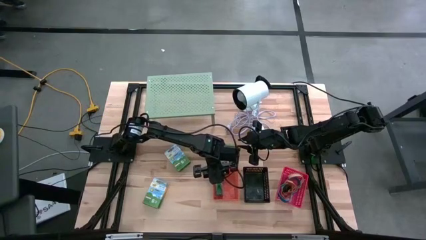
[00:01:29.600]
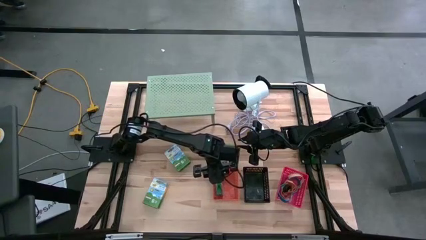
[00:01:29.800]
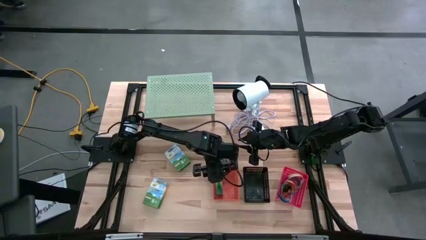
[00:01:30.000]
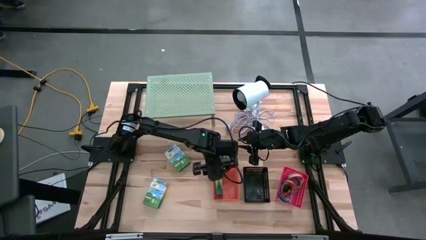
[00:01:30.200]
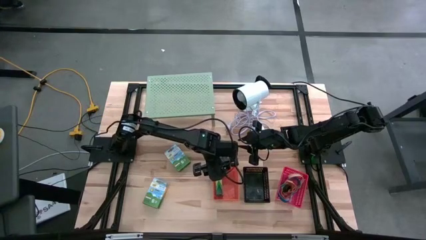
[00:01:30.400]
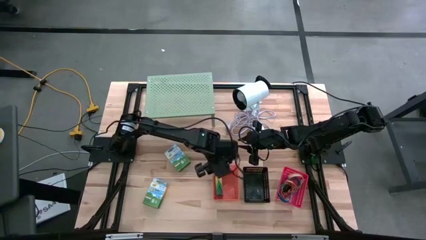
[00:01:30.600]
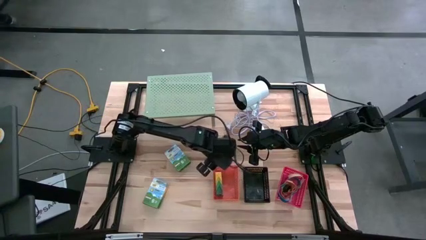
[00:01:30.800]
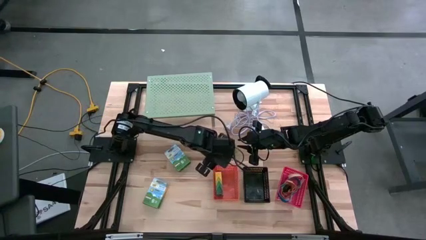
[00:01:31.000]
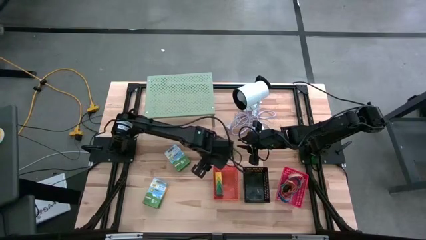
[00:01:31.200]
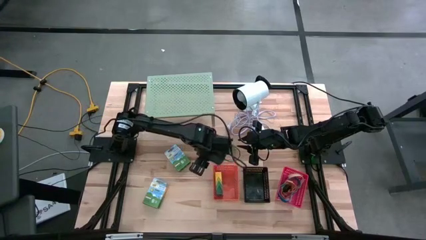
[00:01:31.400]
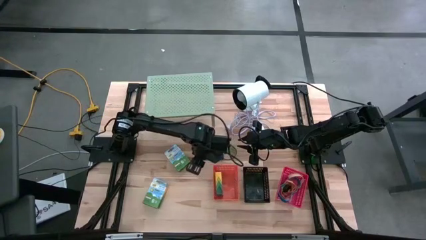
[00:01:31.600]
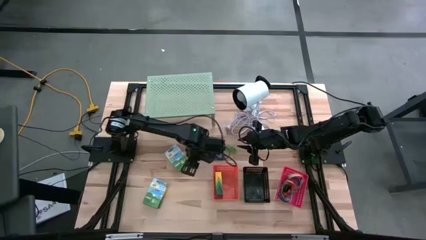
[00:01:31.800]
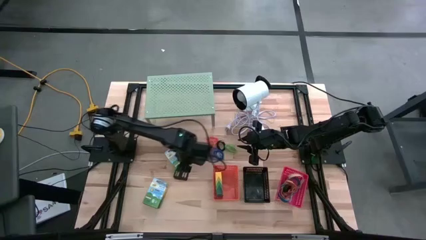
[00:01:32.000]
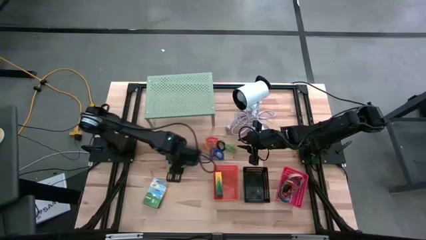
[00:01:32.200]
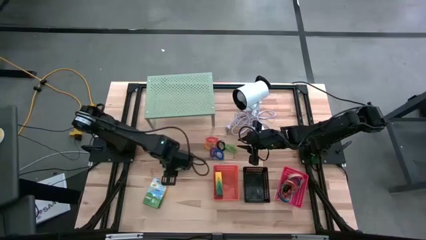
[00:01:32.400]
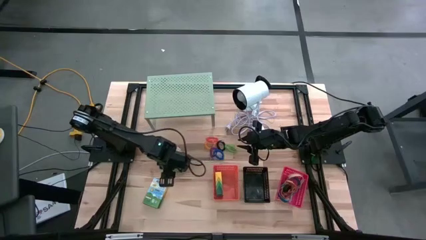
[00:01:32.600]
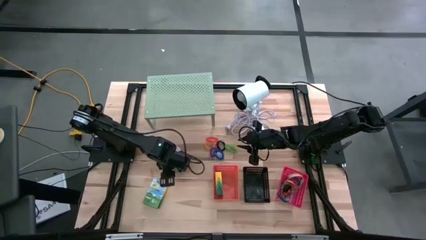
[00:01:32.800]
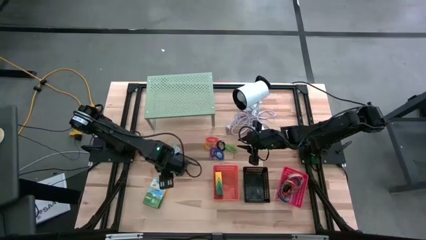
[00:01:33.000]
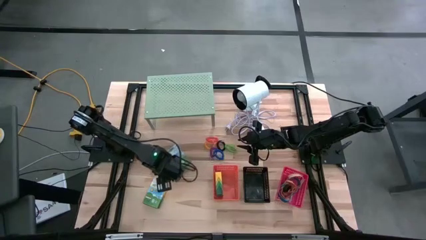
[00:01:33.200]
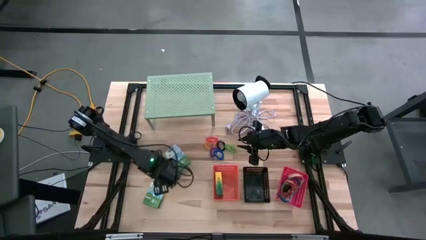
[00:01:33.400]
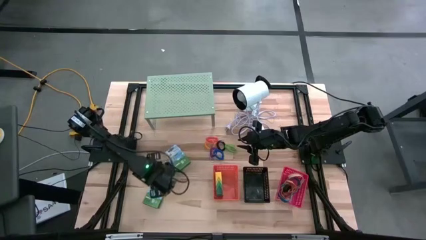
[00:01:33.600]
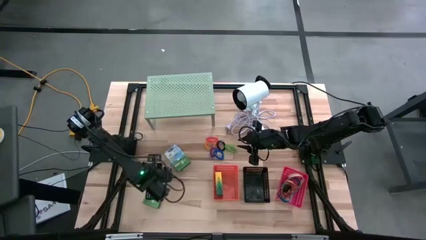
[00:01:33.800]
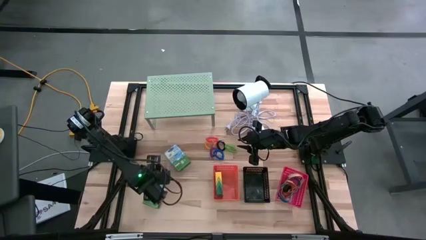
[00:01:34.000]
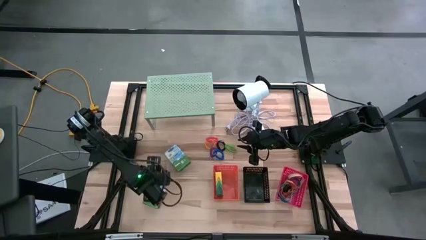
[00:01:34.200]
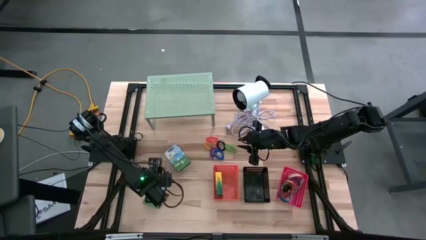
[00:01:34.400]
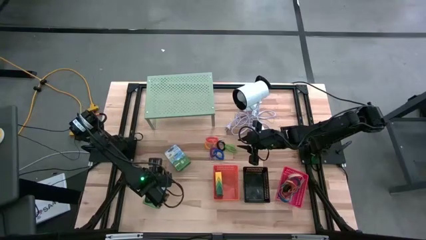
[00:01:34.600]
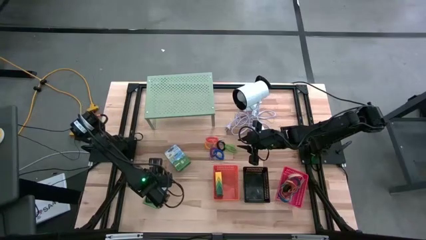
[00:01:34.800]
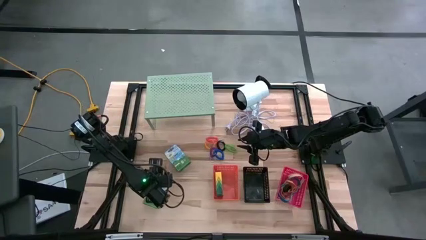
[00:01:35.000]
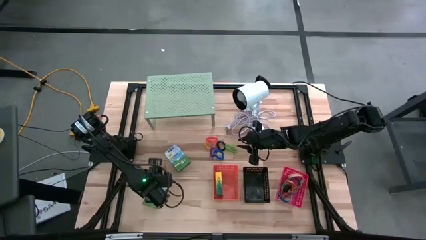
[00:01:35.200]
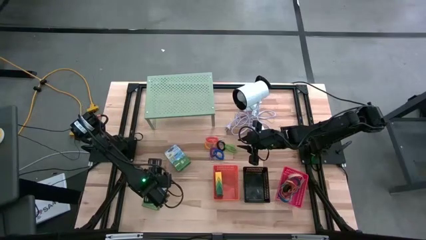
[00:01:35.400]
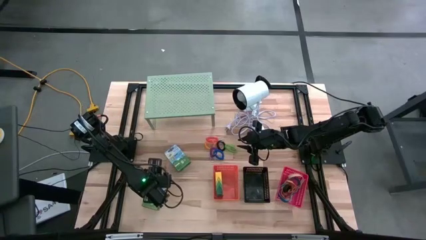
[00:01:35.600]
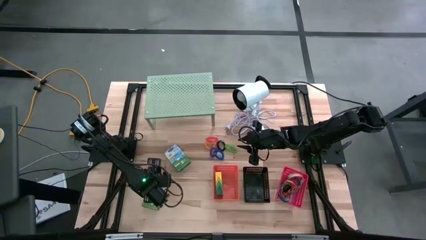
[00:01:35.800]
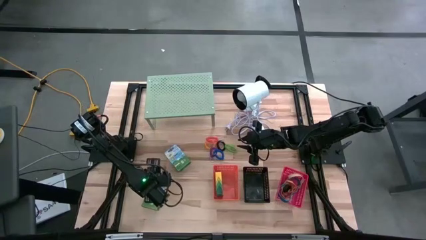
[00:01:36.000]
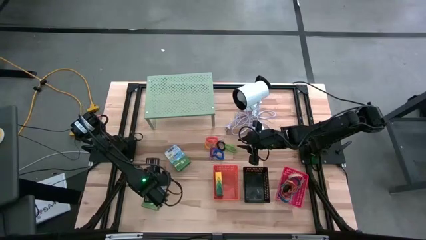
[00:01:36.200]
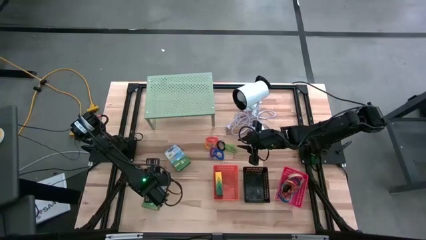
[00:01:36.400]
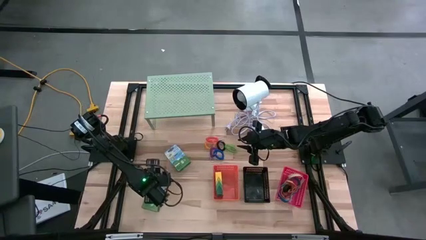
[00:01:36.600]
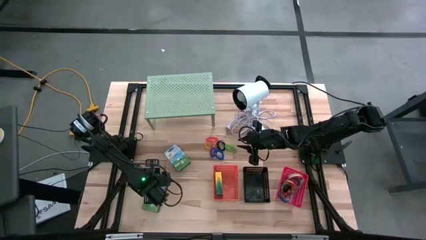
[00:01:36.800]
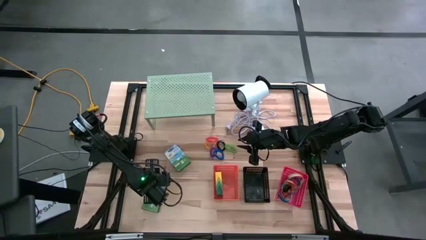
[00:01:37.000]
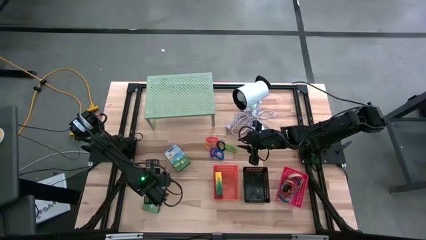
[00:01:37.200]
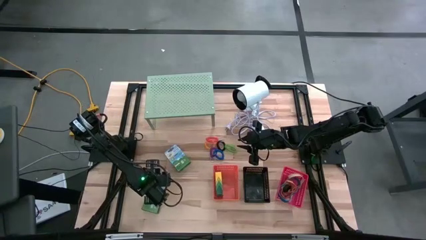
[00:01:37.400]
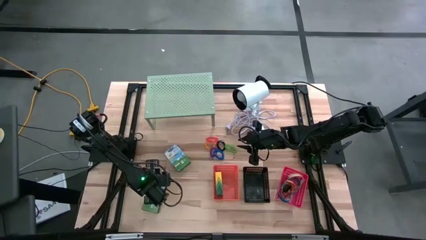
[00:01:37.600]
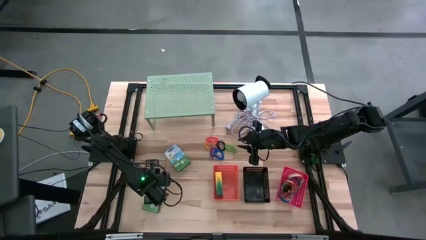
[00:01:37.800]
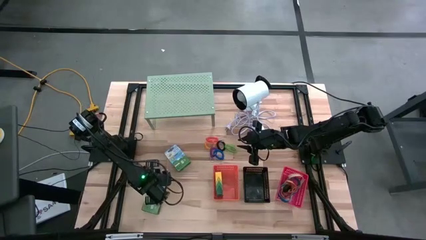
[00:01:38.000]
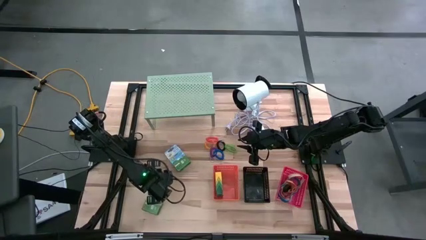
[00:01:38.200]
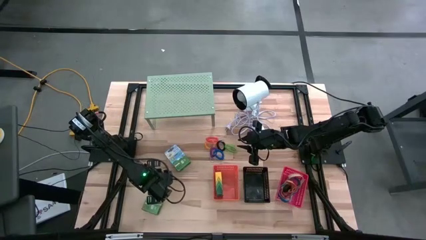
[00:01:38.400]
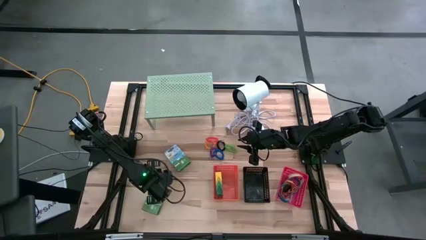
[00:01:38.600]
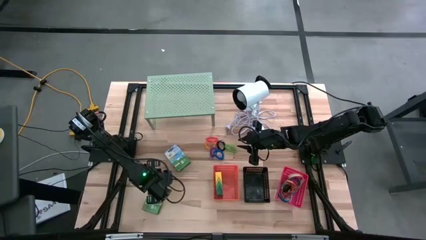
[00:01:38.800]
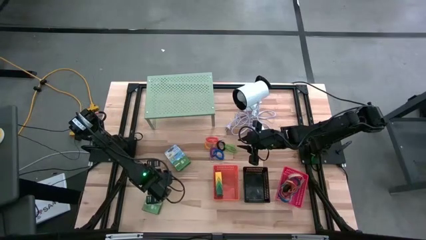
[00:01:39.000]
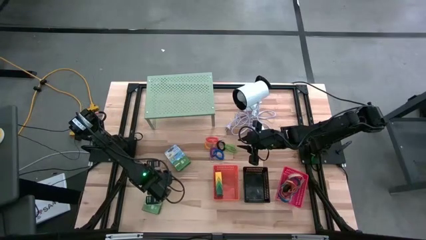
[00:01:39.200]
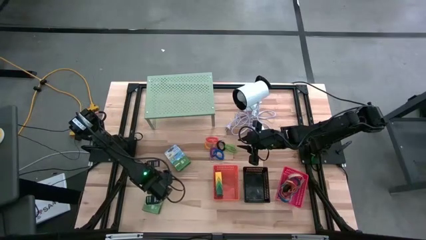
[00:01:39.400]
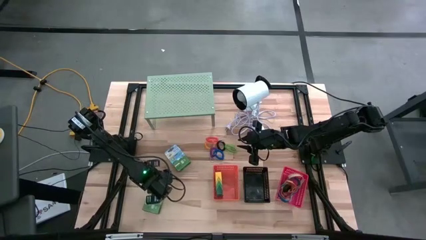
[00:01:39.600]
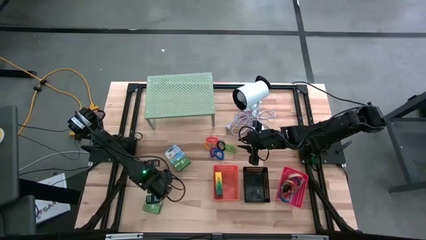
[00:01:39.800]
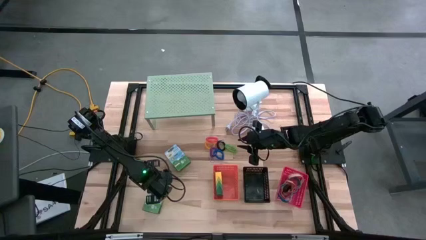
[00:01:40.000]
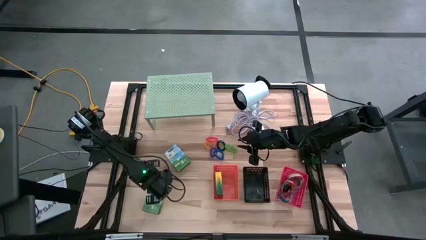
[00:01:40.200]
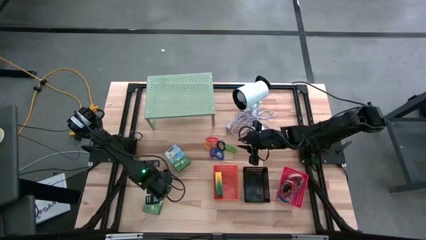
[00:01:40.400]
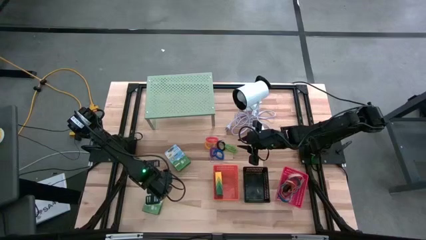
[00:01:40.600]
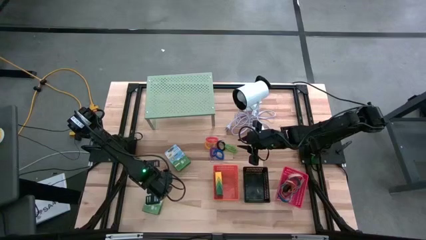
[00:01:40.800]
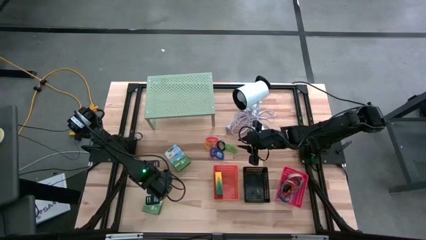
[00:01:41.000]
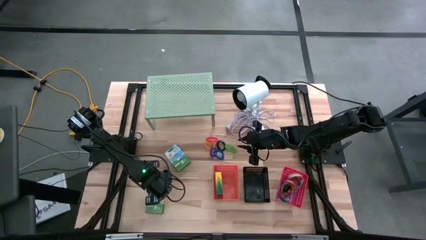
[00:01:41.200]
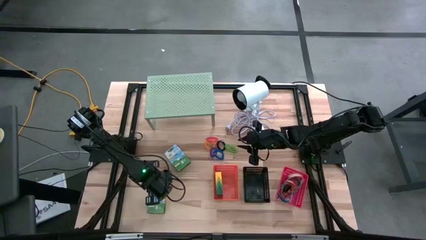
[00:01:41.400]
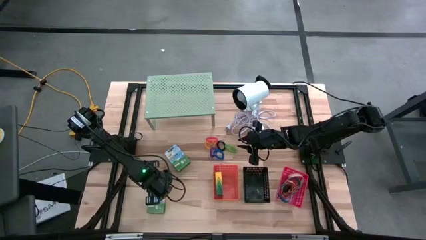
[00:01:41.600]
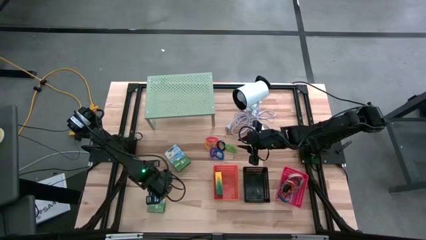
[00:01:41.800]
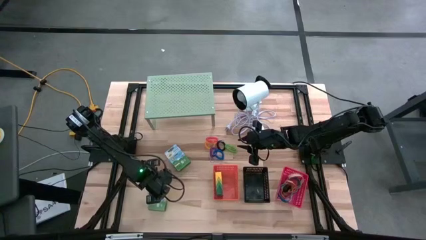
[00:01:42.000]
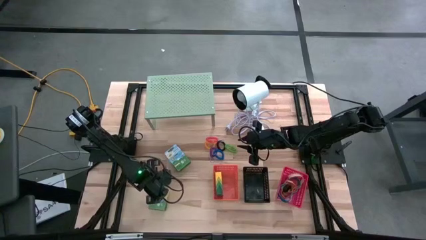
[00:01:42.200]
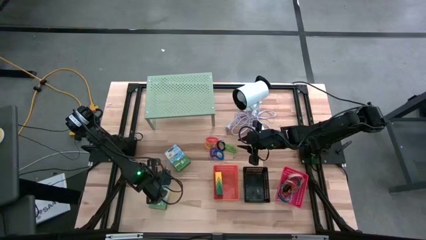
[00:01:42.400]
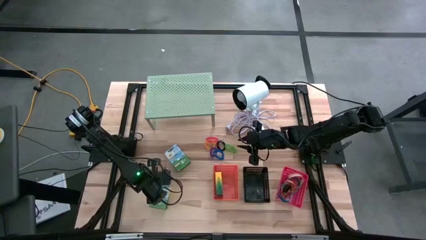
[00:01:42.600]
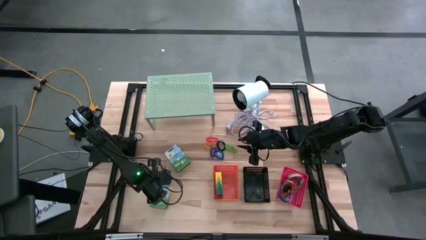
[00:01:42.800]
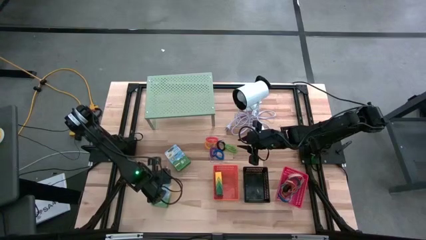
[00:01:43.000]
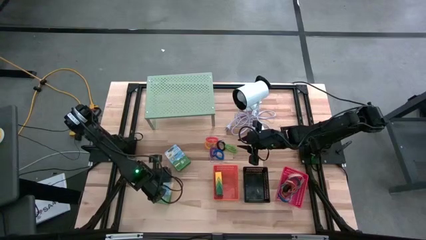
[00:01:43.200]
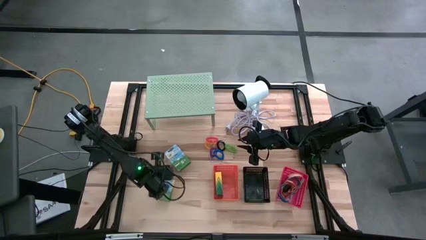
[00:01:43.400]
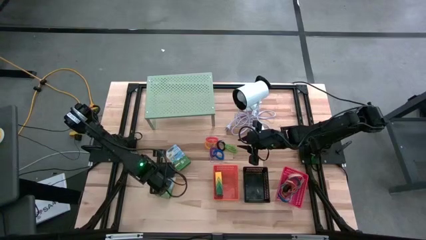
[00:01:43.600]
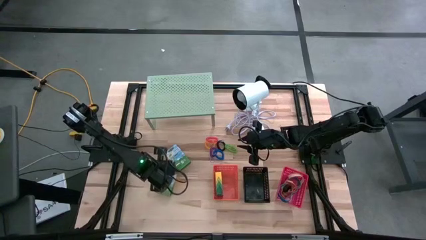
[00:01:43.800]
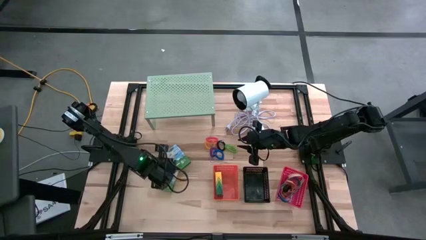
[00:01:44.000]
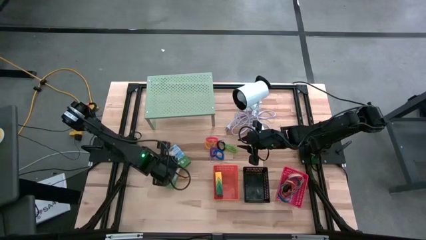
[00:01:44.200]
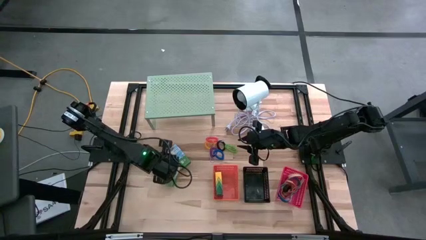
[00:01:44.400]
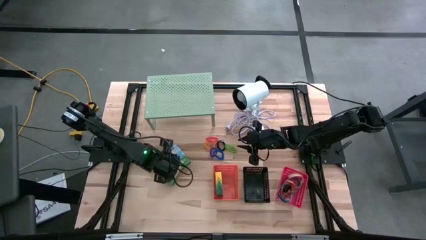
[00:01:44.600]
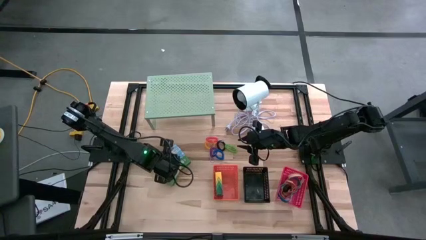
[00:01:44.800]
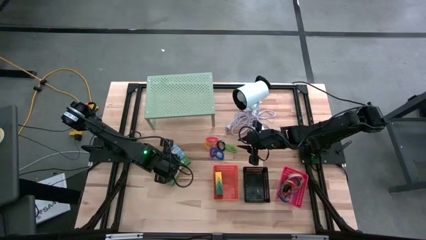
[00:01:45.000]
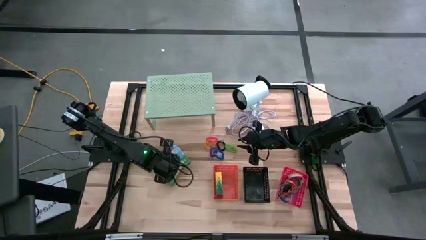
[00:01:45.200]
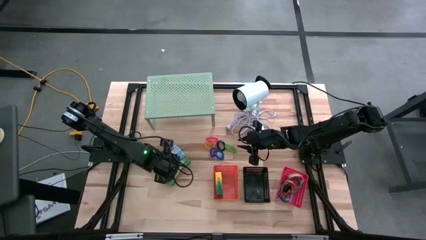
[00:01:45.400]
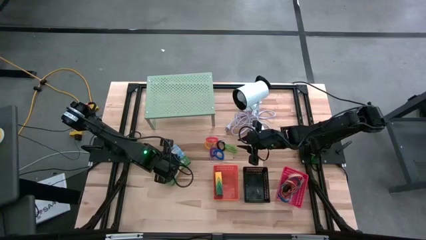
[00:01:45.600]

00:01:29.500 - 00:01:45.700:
Task: Pick & Place Office Desk Supplies
Put the bottom crayon box into the orange basket
